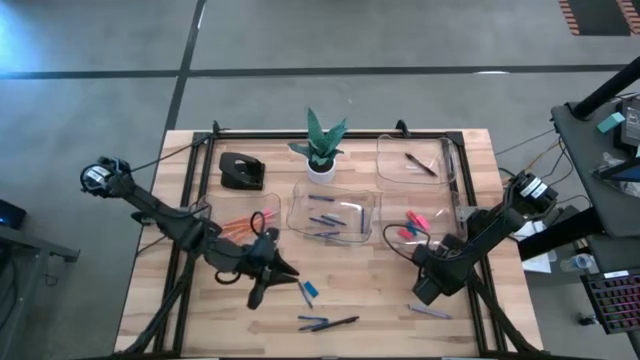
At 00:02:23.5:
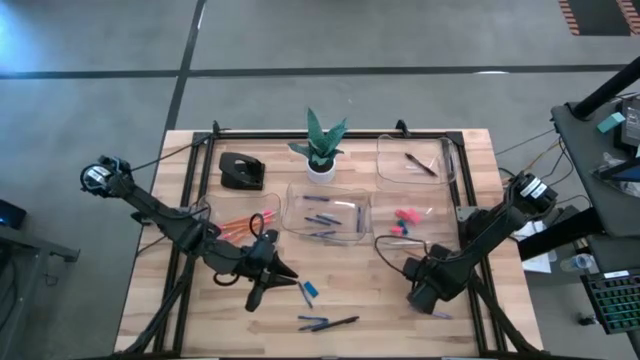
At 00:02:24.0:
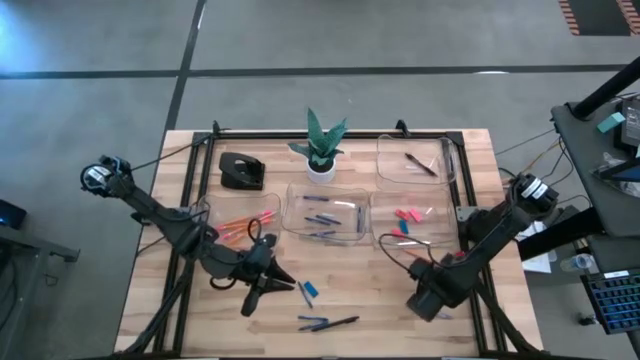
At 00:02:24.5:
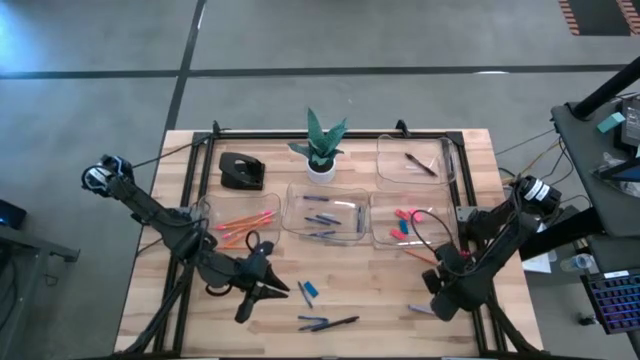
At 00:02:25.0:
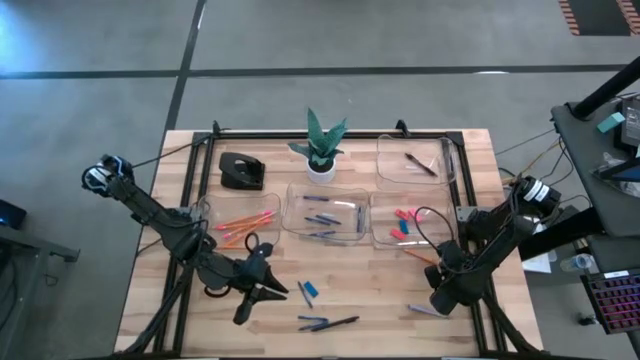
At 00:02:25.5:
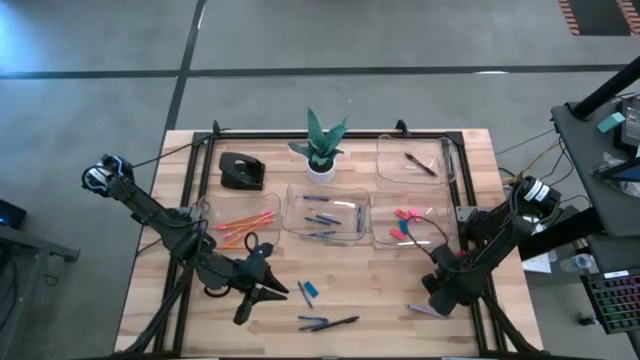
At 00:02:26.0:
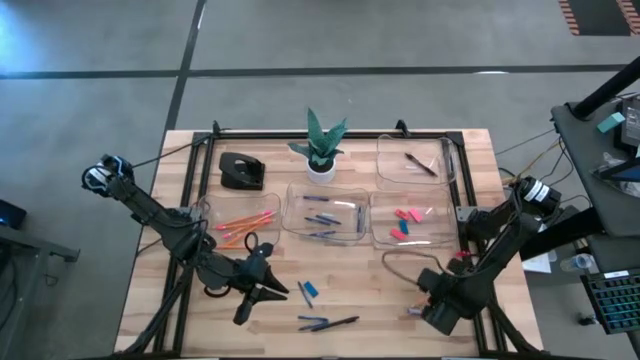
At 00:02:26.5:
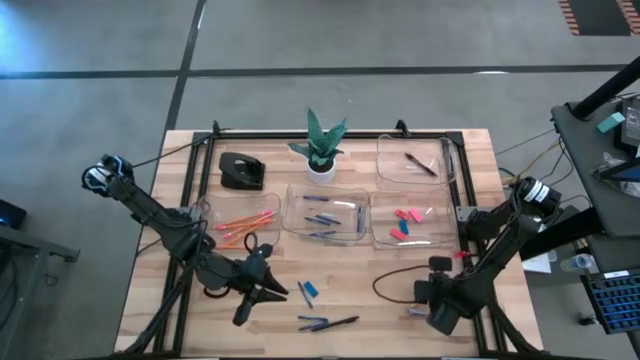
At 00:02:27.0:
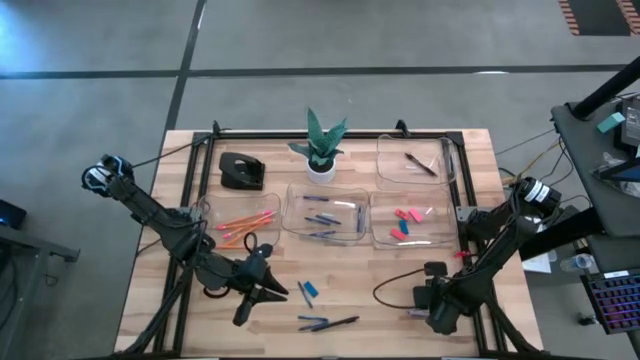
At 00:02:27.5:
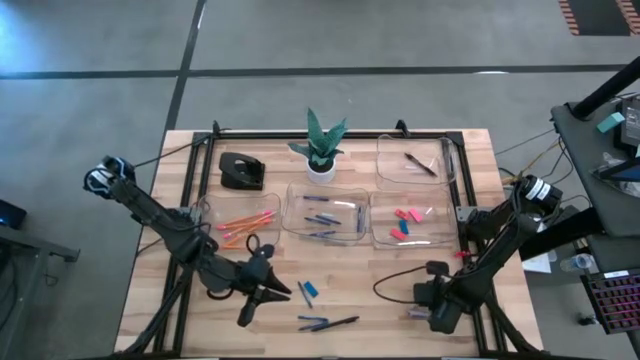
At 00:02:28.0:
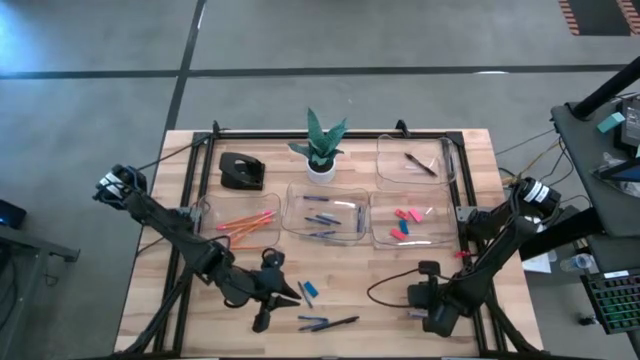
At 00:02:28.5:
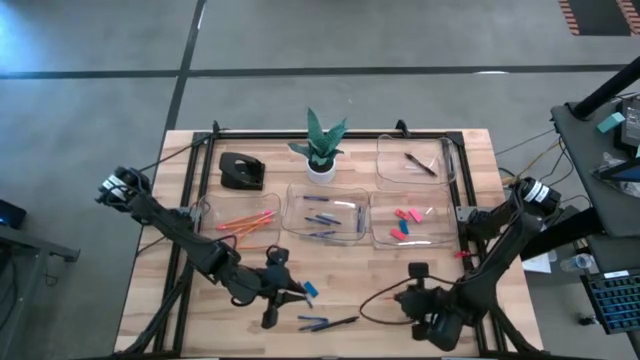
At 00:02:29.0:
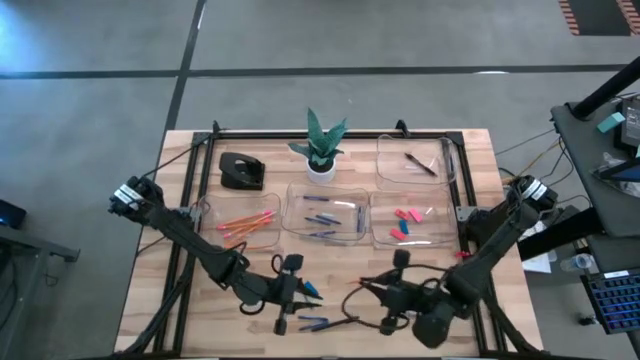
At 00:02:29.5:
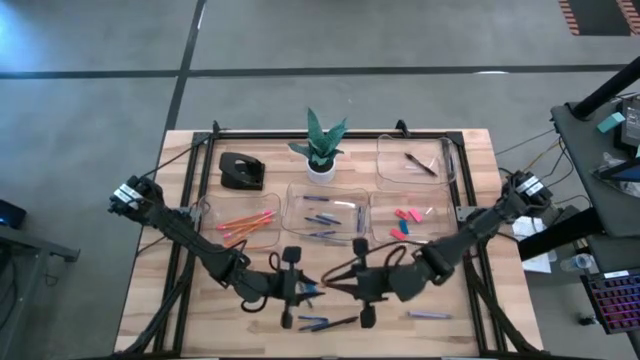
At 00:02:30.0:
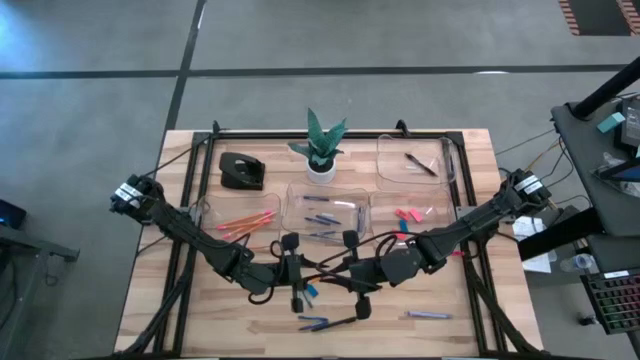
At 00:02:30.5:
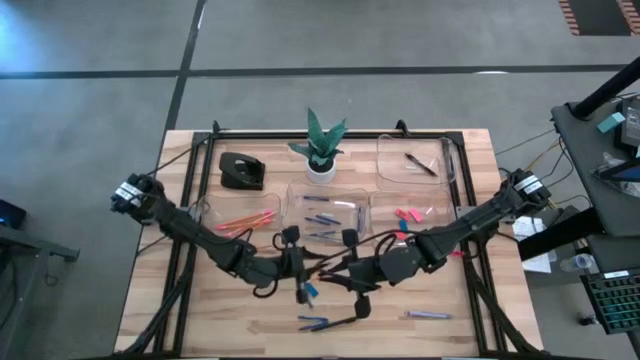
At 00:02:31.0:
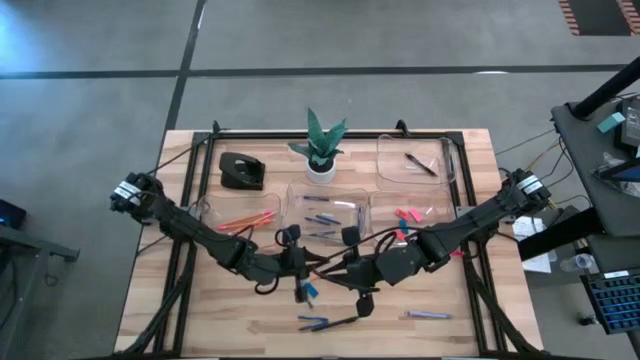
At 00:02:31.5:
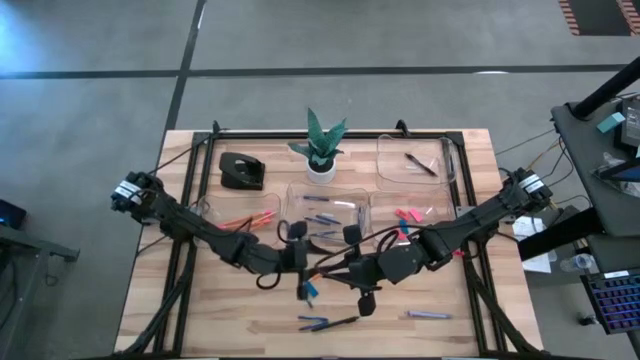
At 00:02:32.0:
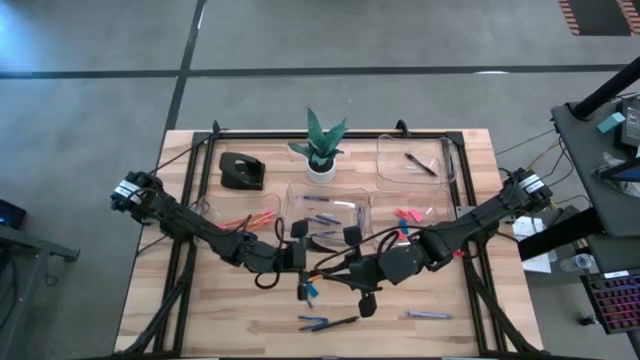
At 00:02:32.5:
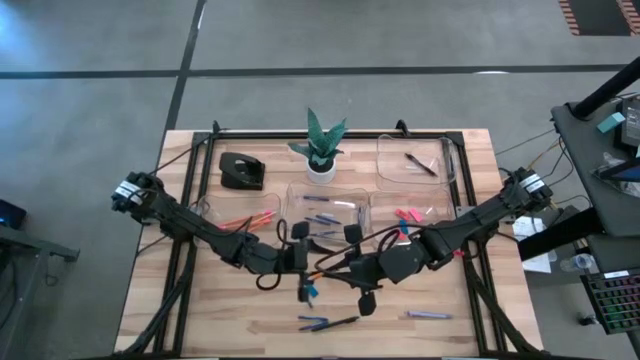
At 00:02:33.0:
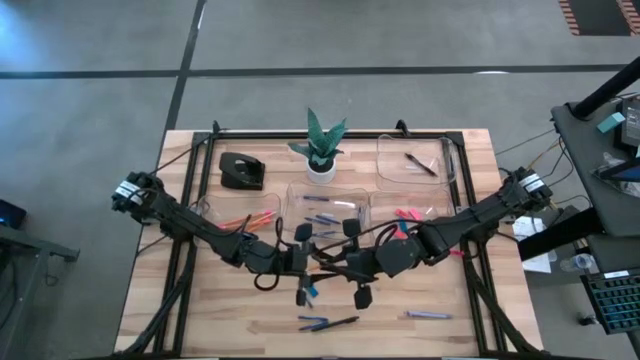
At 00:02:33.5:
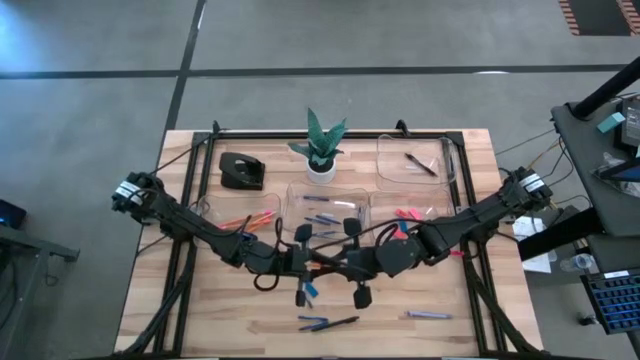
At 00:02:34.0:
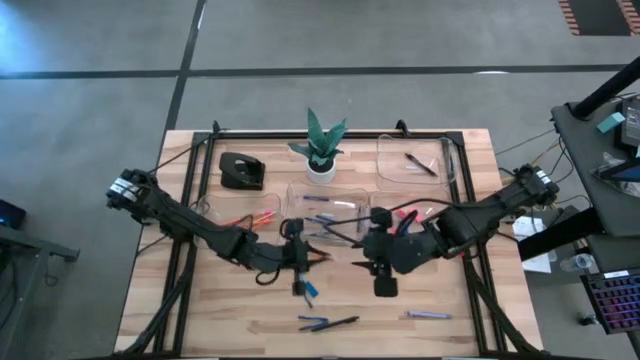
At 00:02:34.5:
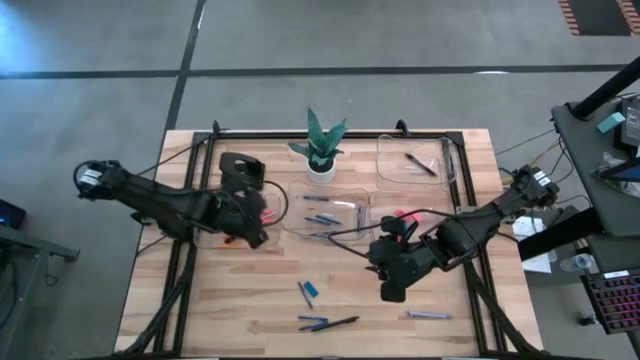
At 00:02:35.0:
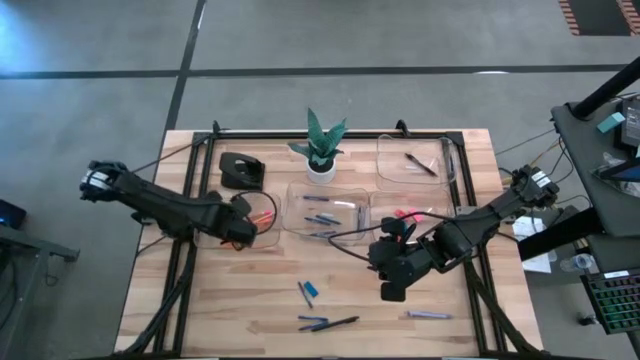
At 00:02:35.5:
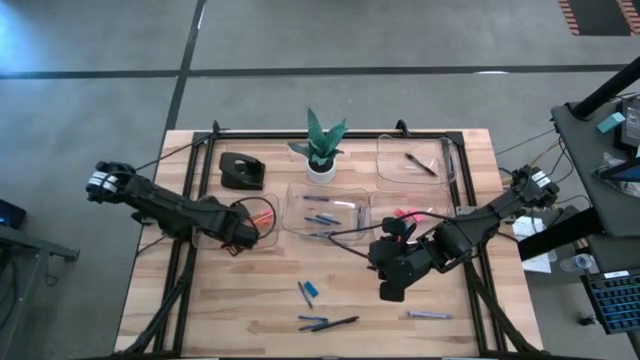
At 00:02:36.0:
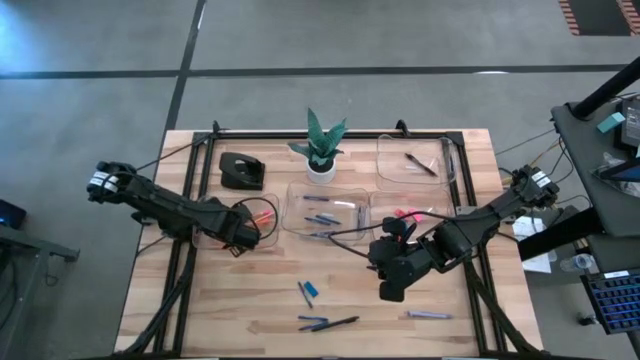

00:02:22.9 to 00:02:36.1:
Task: Sort crayons/erasers/pens/pencils in bins
Put the orange pencil into the middle left transparent bin

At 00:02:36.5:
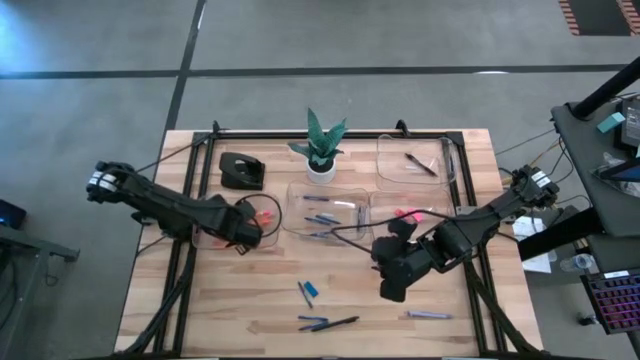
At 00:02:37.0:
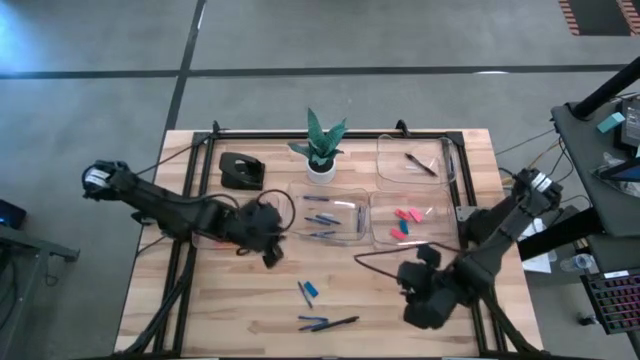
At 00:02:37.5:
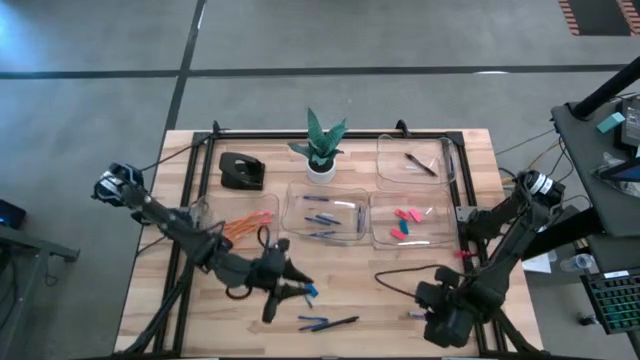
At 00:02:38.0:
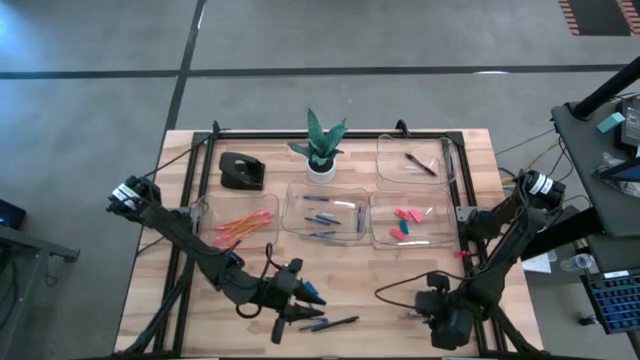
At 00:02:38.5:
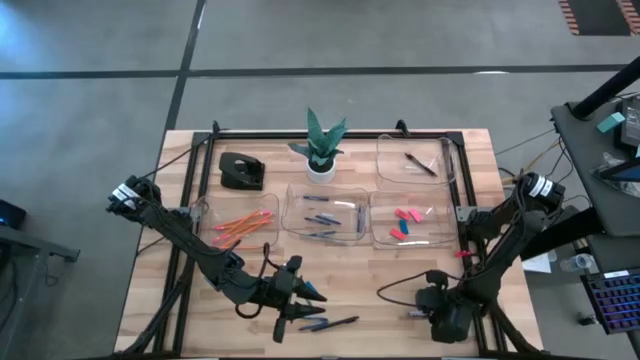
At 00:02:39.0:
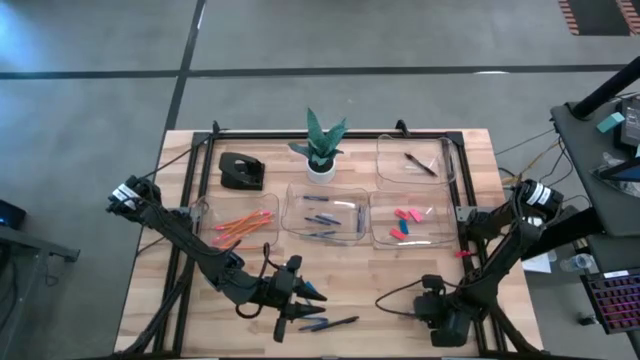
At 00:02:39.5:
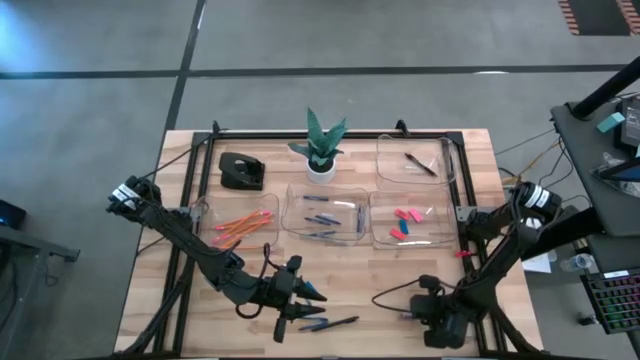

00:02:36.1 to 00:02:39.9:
Put the violet pen into the top right transparent bin

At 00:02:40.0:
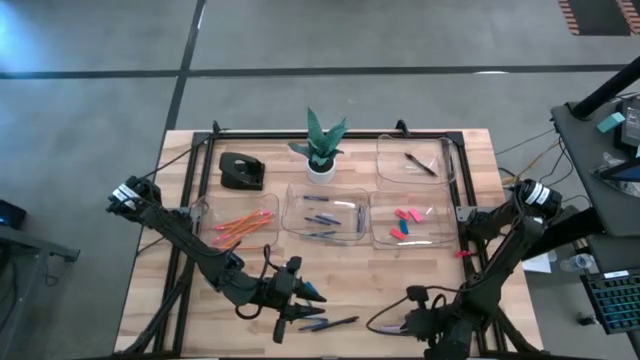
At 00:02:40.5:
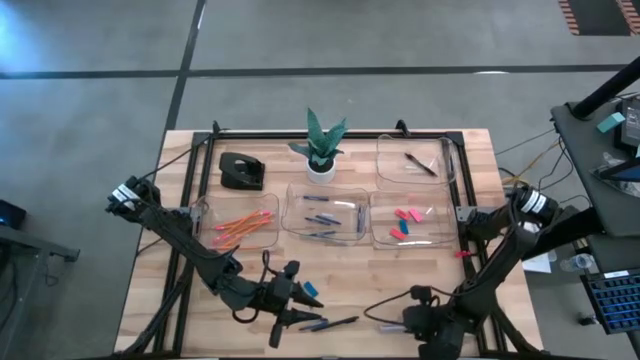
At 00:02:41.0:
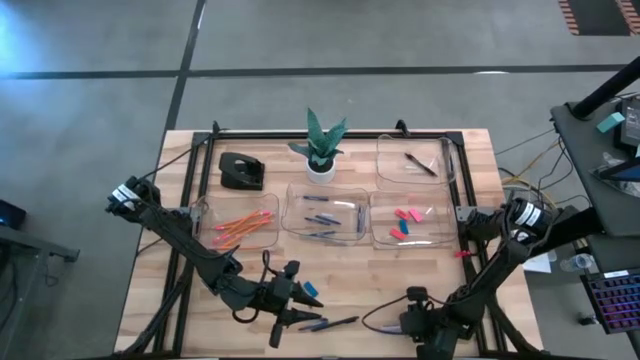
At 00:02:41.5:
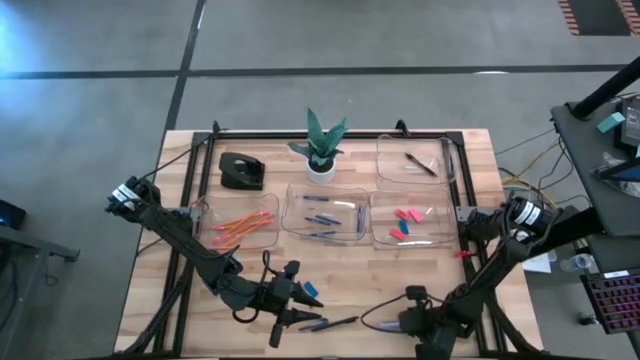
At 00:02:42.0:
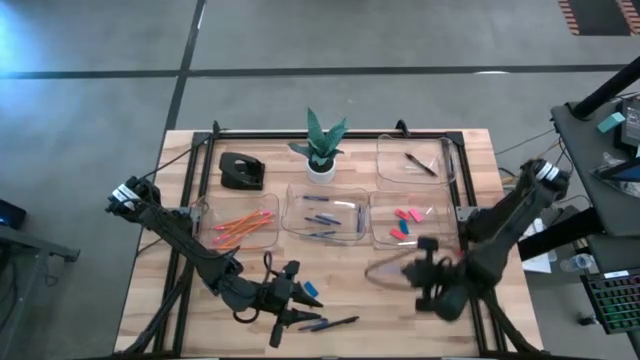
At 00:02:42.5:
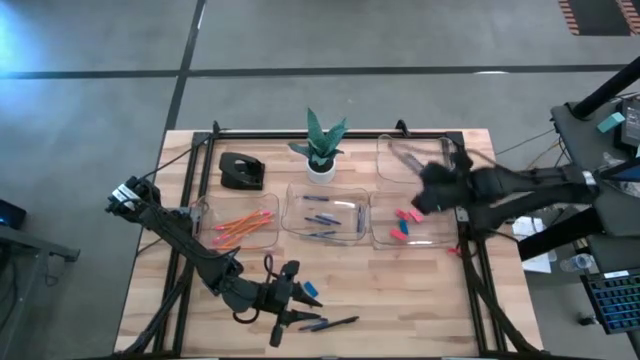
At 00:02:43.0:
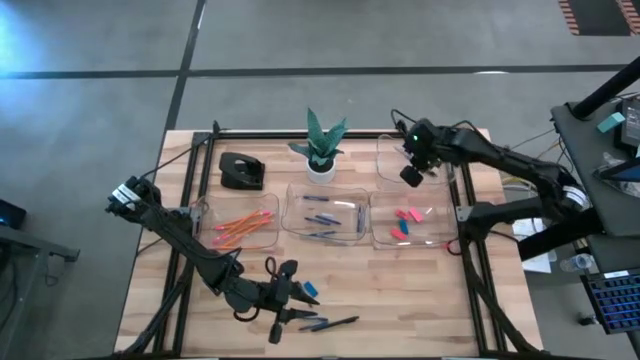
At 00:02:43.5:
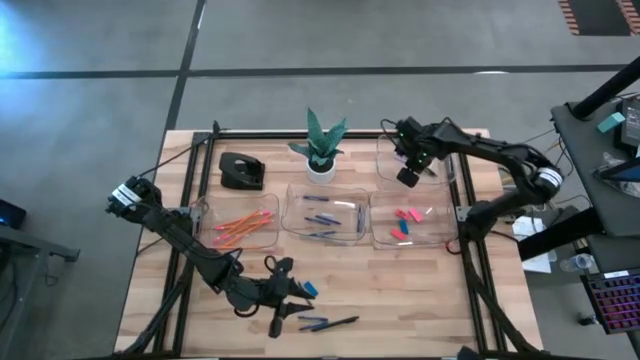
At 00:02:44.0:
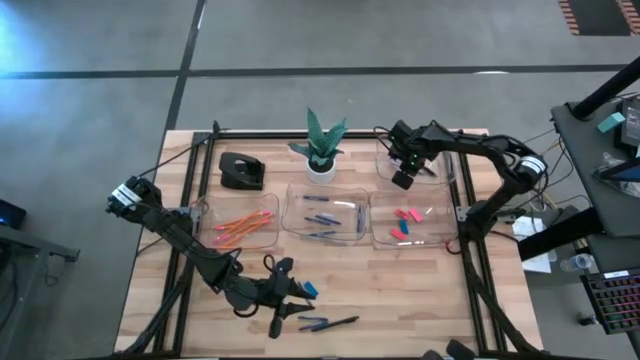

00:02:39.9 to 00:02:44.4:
Put the violet pen into the top transparent bin
